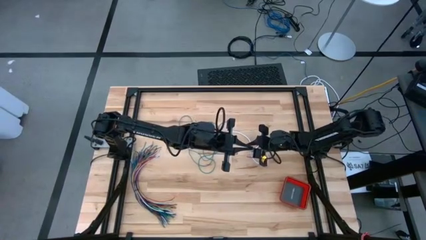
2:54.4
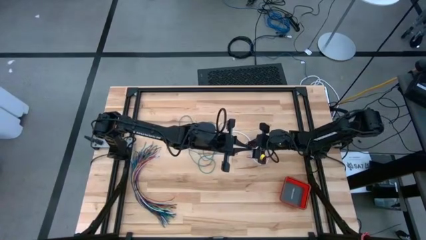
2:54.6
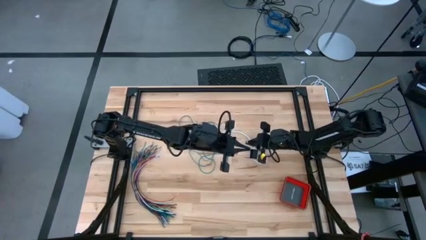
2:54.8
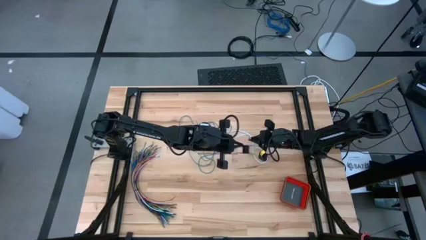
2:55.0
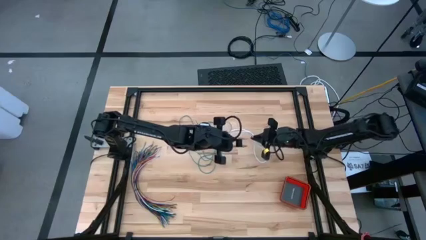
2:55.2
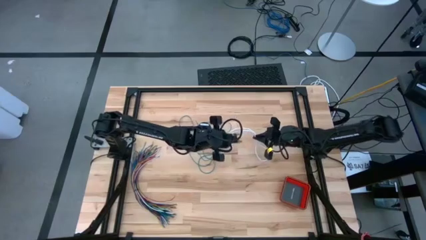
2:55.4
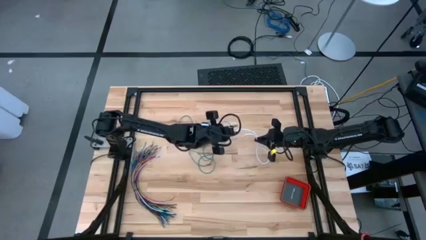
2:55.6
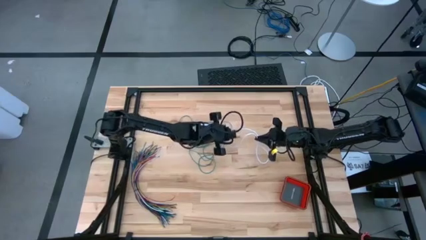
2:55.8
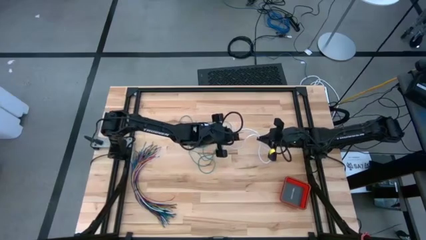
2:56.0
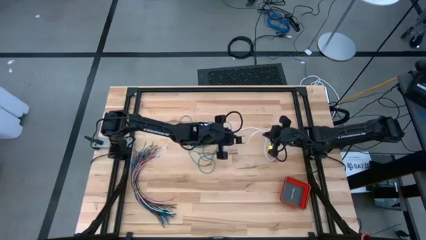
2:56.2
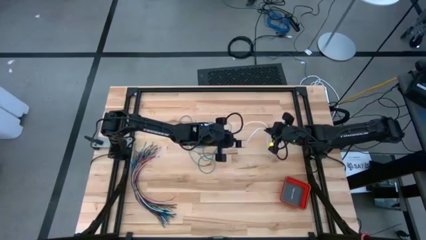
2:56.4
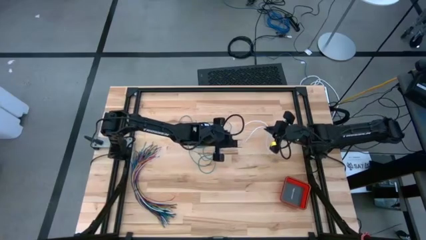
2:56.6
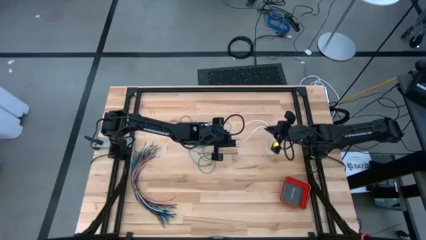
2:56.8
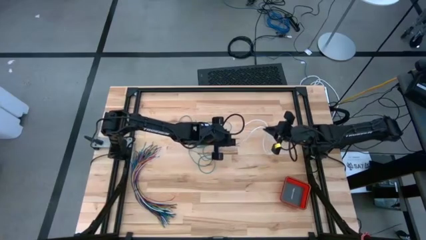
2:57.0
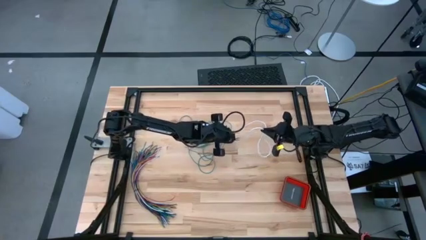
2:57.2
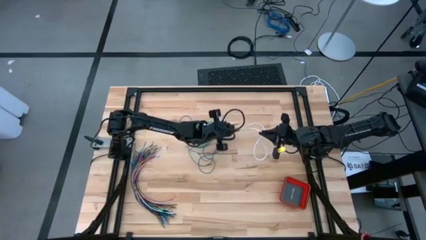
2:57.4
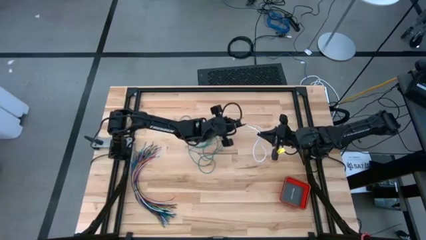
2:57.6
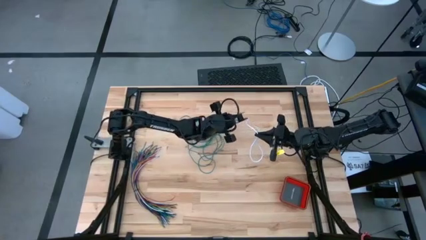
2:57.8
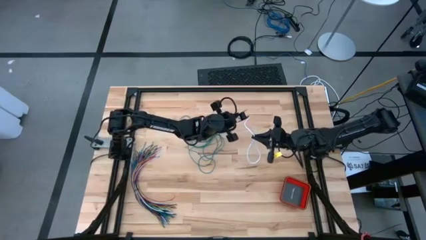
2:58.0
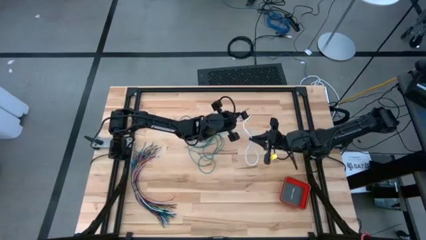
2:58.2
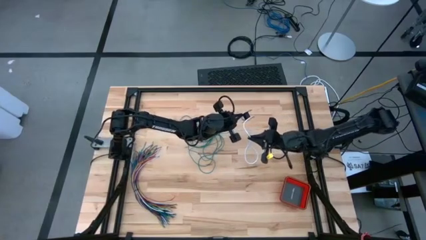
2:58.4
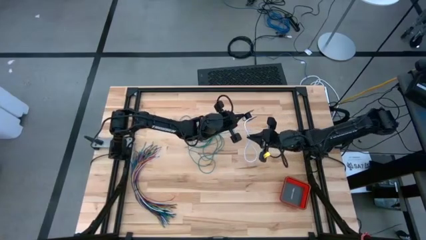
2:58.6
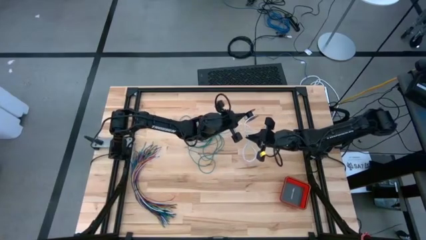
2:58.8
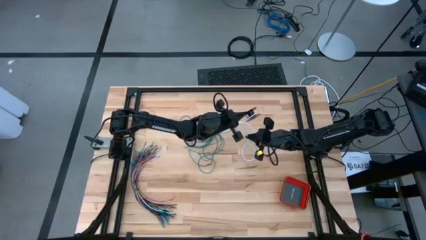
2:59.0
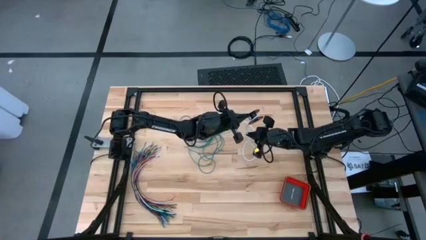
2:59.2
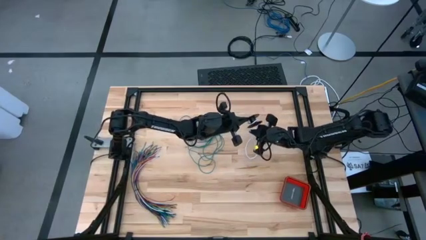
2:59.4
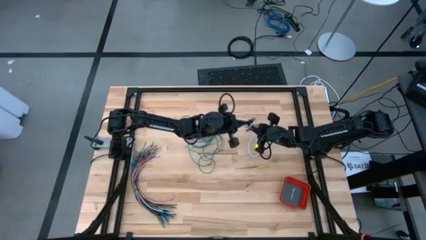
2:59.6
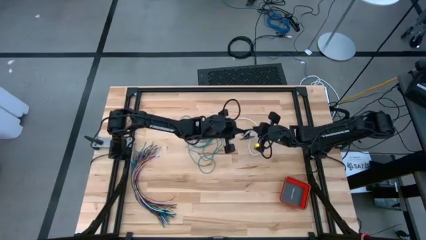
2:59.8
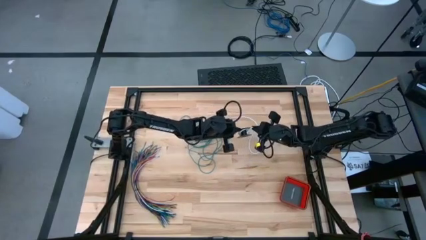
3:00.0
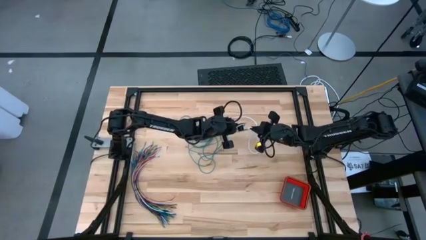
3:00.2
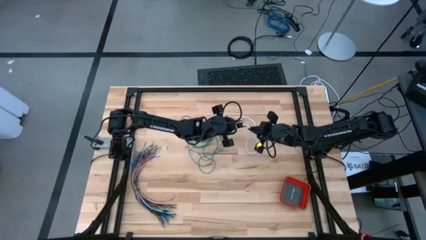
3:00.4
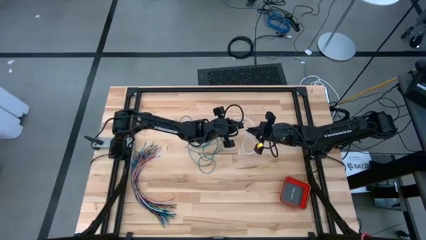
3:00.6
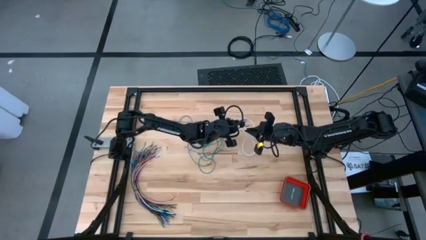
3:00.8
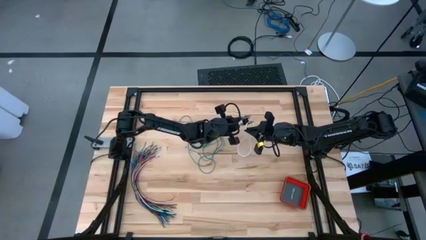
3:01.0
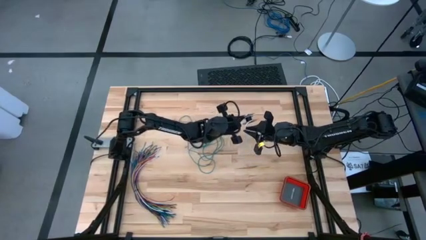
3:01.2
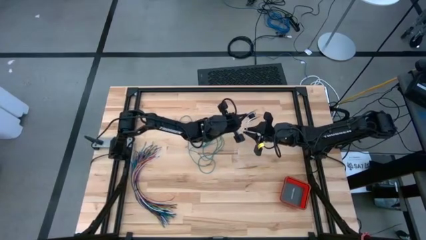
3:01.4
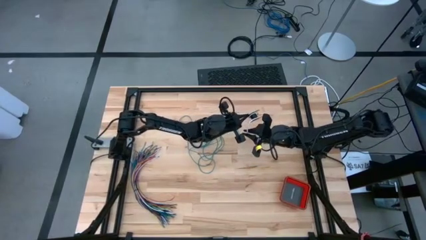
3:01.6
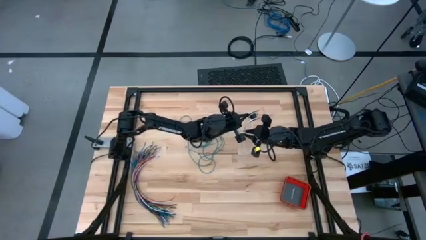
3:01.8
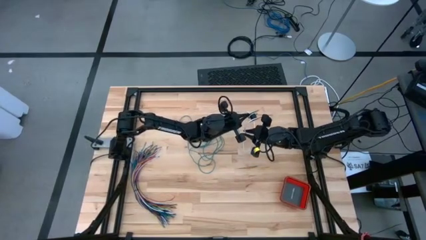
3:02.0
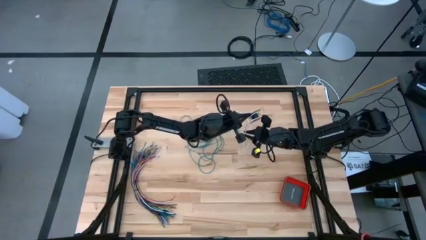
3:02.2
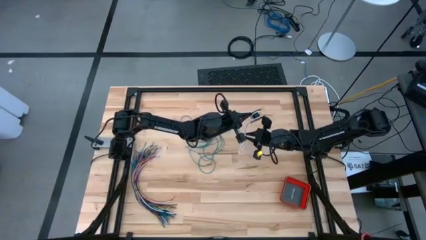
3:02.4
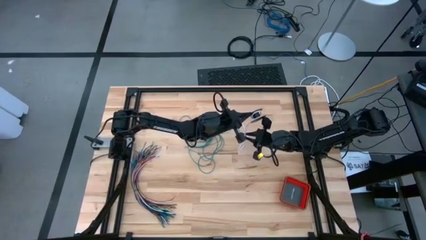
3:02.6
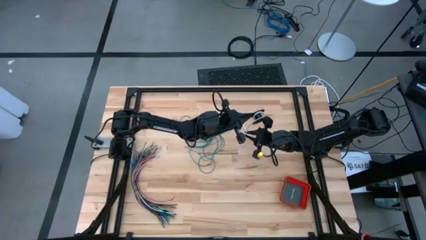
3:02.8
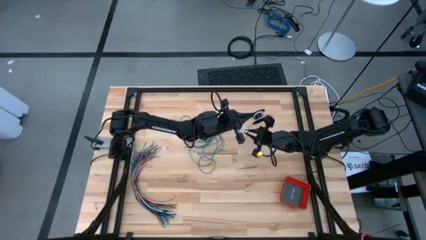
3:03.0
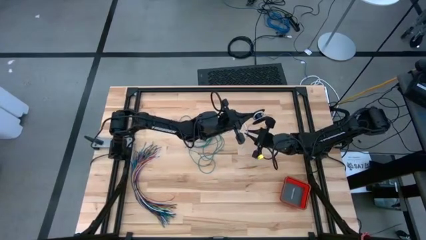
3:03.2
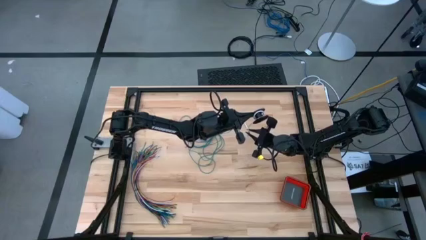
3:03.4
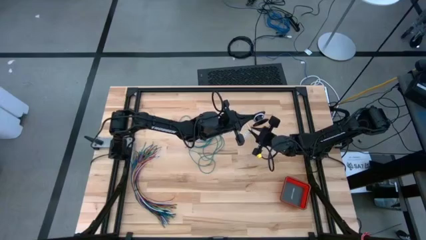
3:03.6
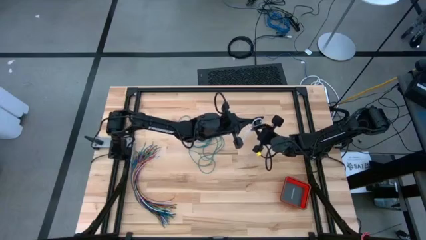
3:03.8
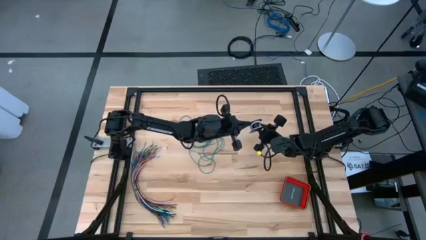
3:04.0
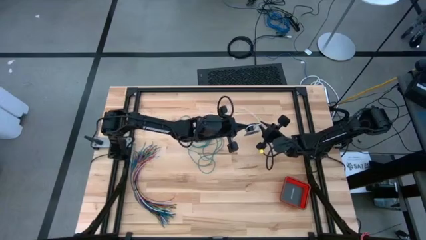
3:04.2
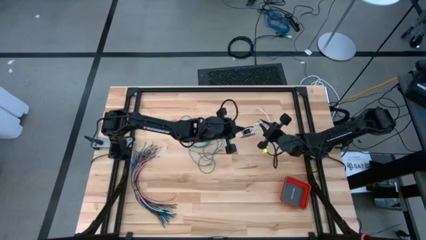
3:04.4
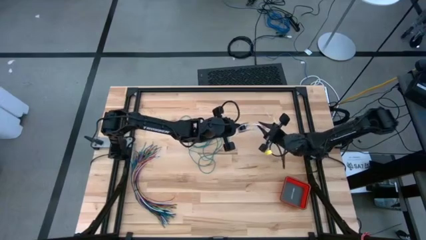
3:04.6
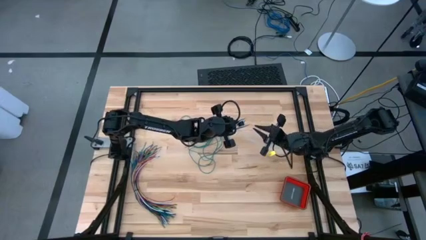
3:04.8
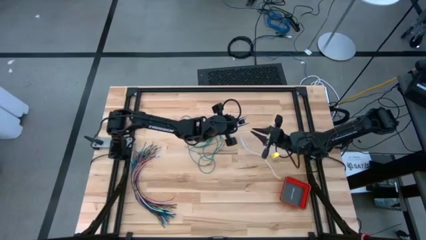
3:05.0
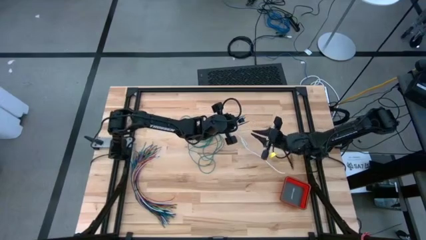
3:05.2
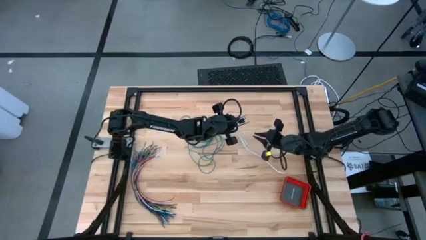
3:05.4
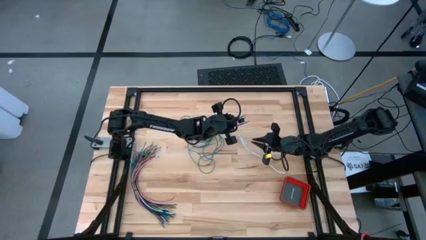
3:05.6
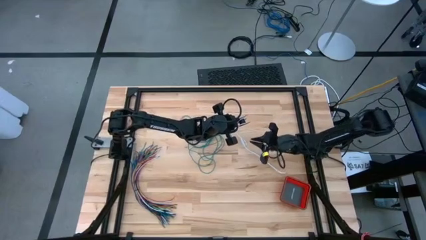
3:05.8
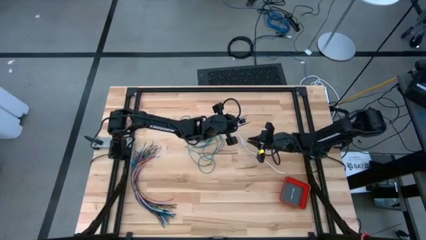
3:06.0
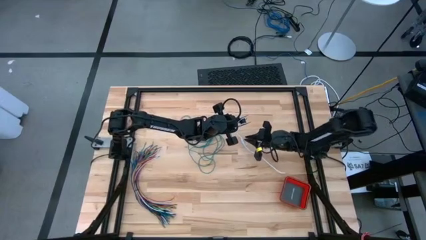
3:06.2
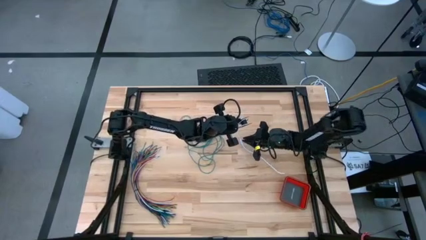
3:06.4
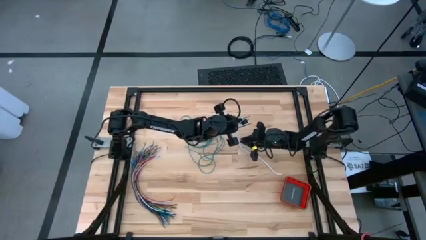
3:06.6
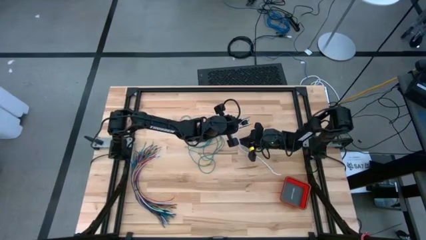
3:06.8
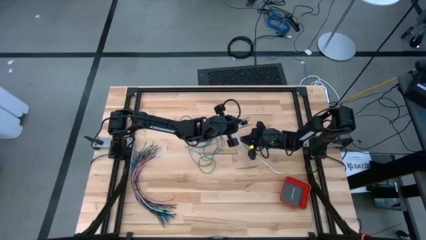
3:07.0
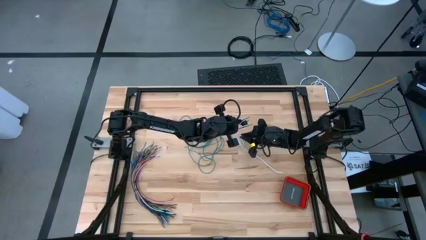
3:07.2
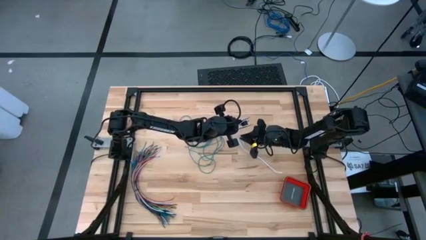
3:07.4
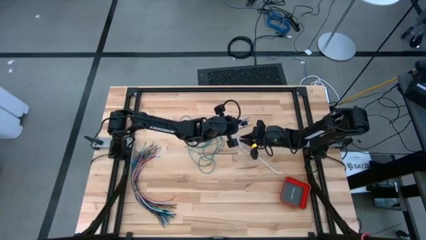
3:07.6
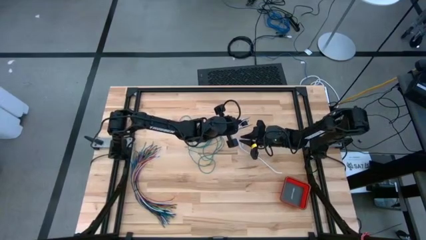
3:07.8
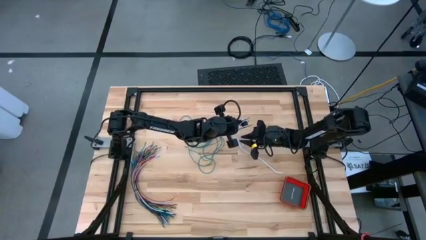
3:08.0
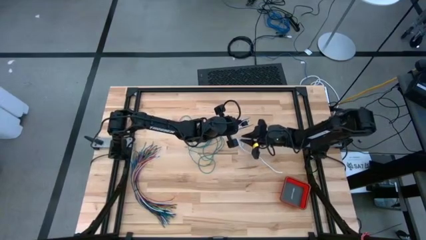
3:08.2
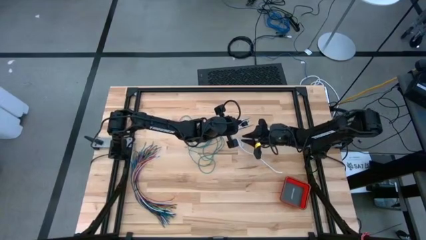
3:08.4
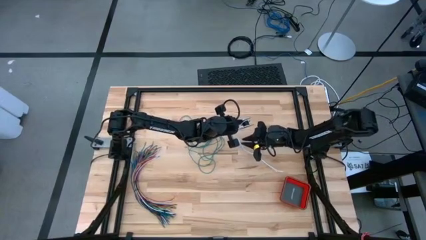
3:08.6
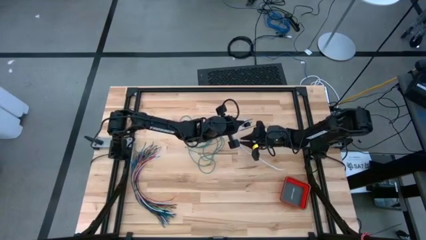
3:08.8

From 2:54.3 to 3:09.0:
Task: Coil cords
Coil the white wire onto the spool

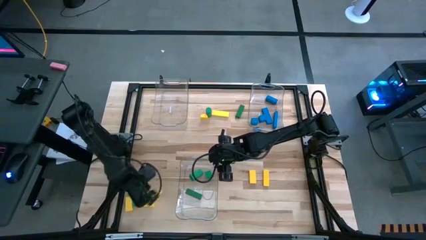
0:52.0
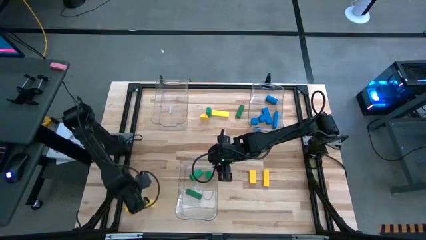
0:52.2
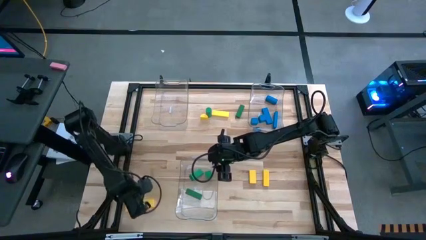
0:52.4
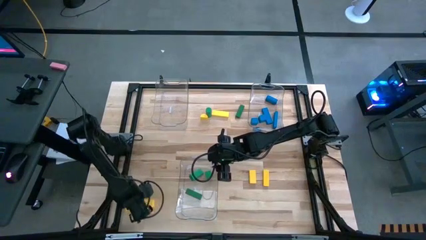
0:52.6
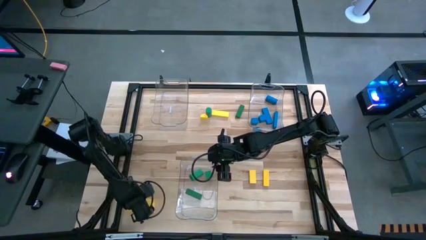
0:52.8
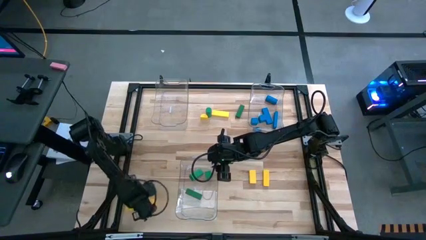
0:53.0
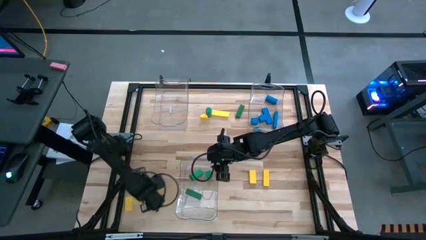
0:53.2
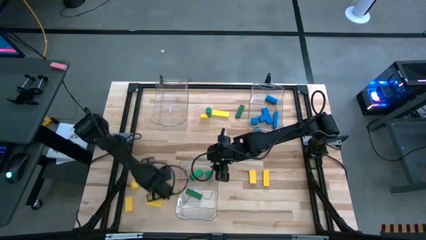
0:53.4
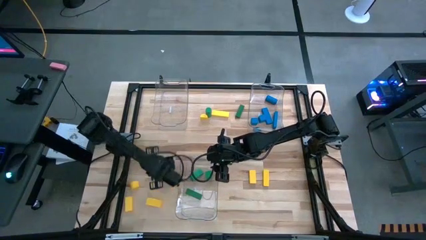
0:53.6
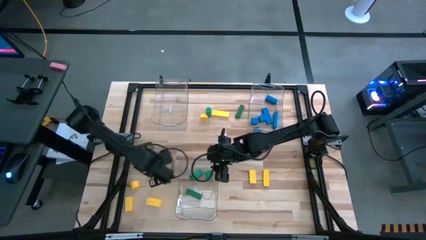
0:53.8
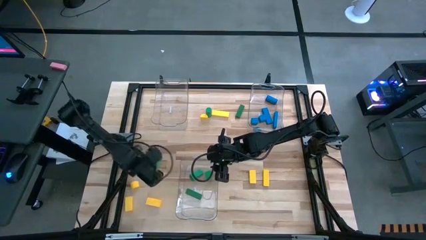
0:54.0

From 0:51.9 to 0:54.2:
Task: Sort blocks
Move the green block to the middle left of the table

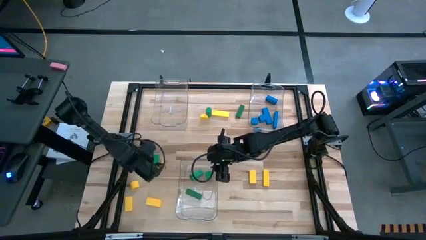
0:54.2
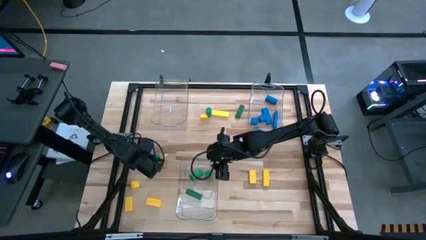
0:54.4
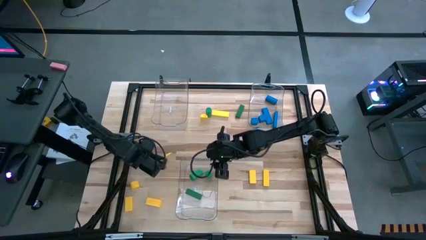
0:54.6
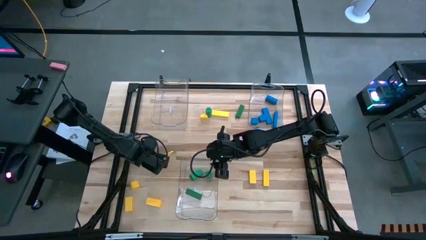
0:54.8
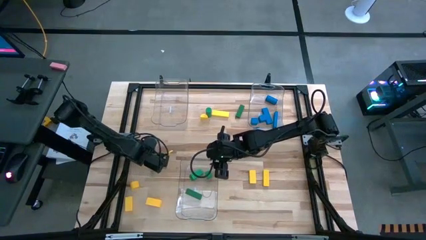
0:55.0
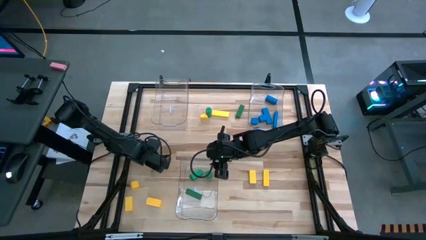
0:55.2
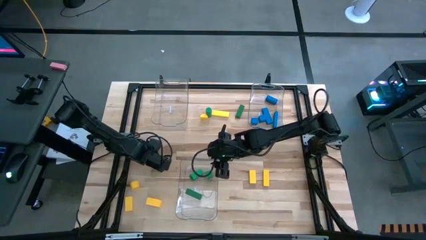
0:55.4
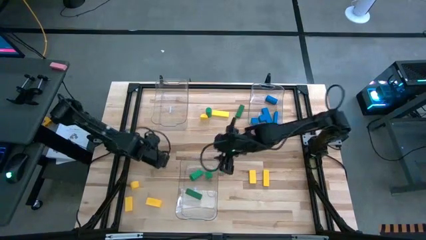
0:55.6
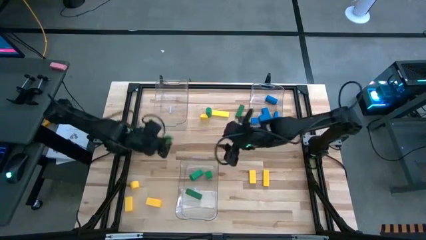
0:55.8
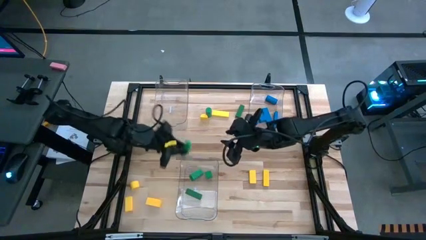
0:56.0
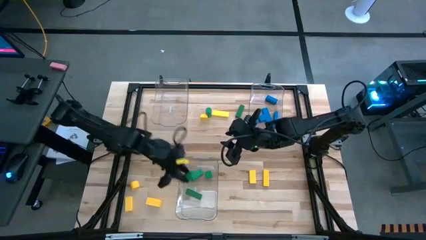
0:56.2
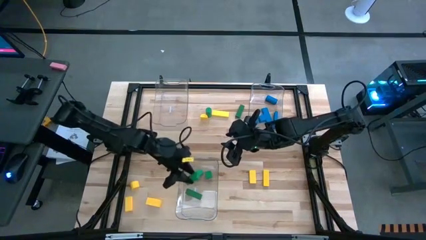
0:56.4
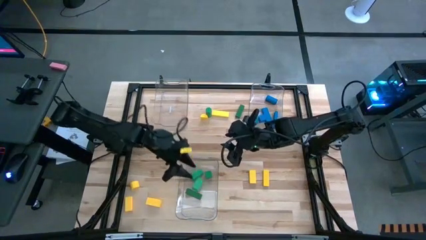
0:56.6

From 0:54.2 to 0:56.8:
Put the green block into the bottom transparent bin
